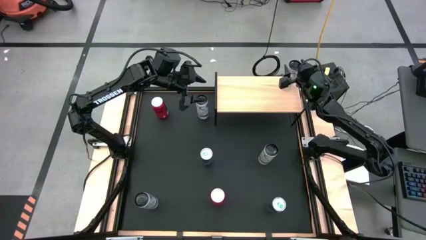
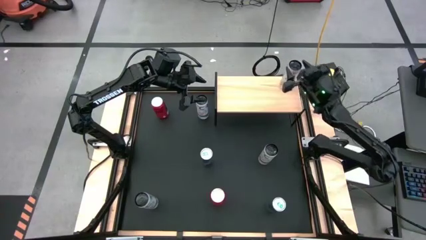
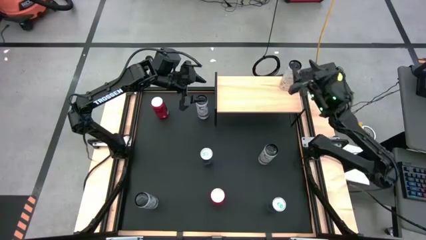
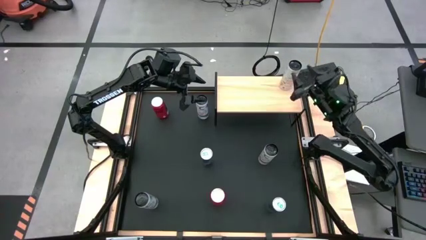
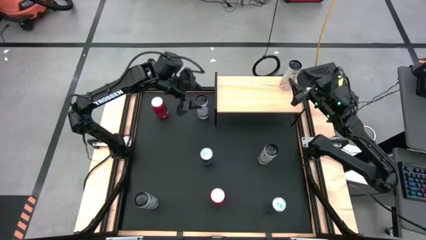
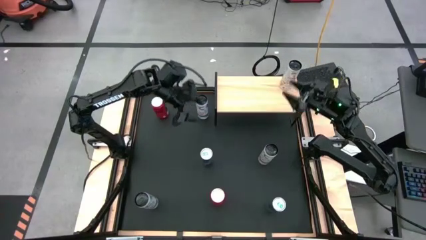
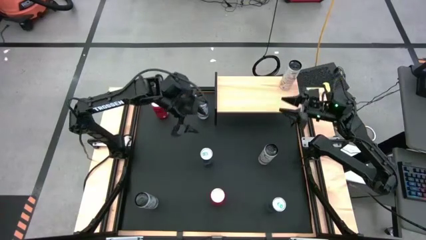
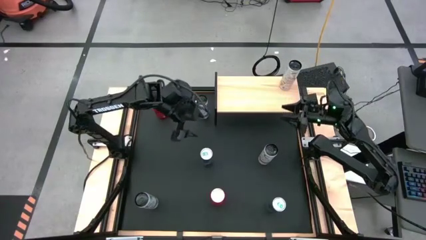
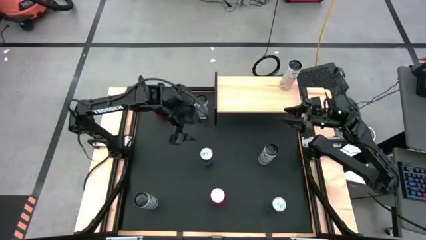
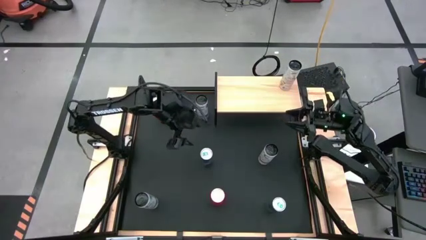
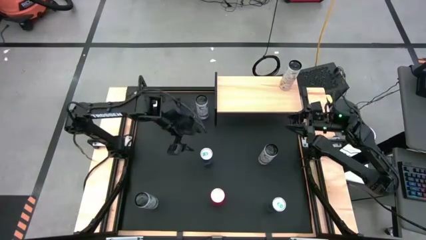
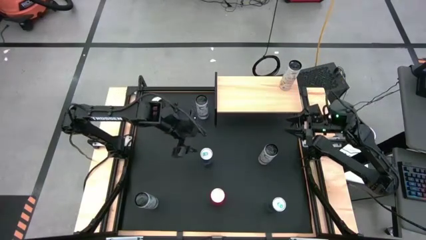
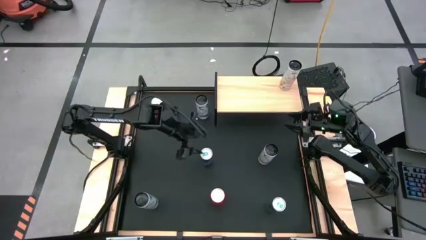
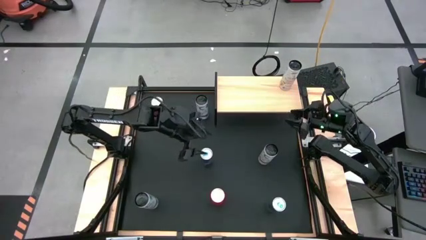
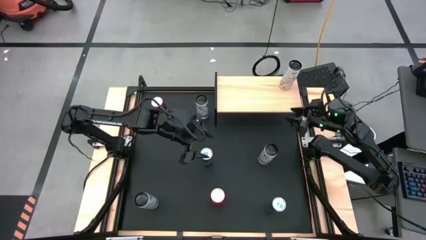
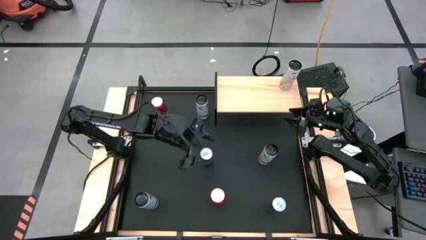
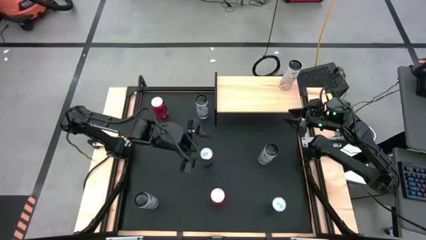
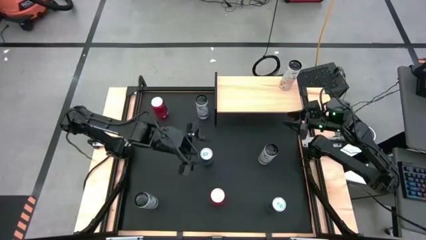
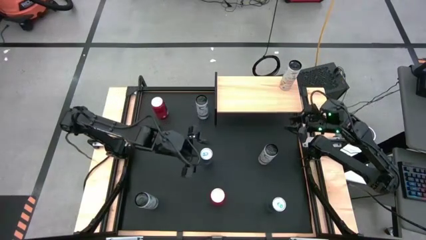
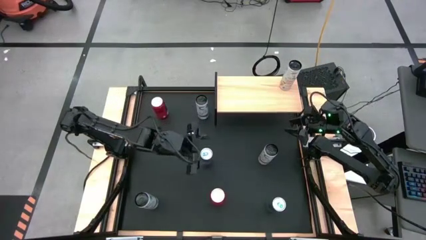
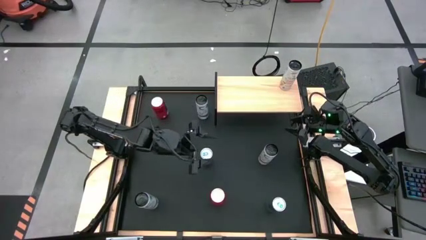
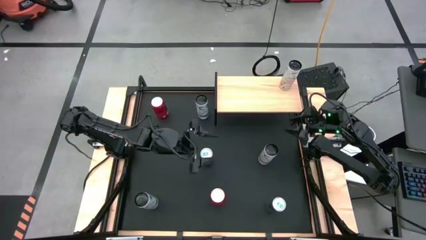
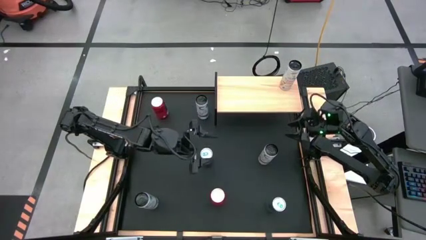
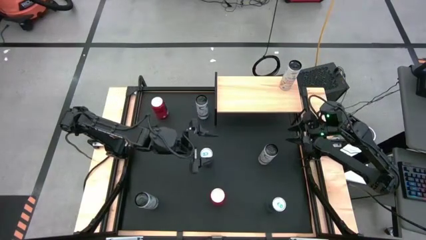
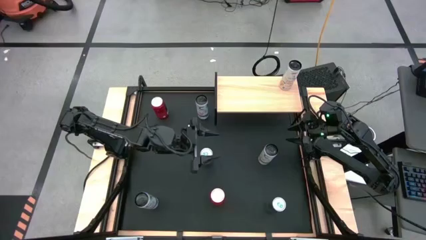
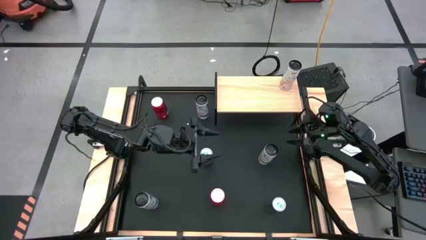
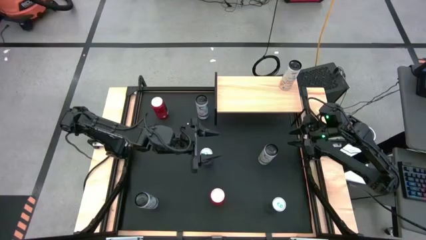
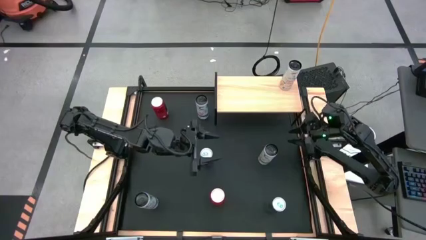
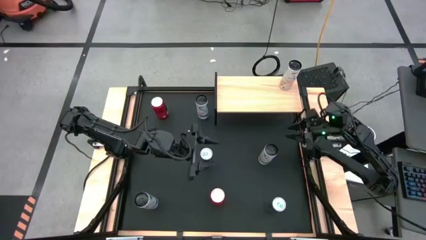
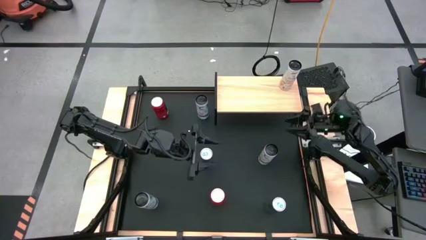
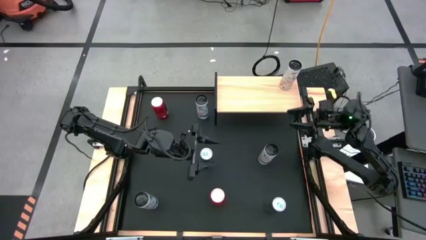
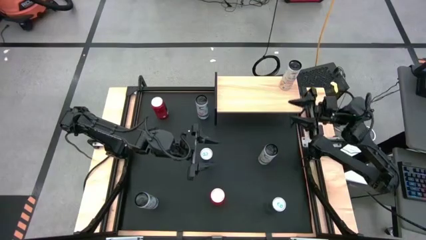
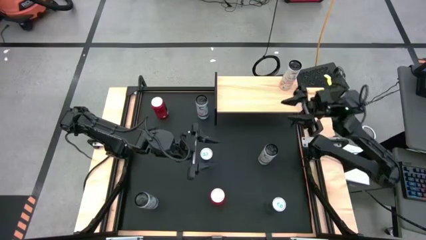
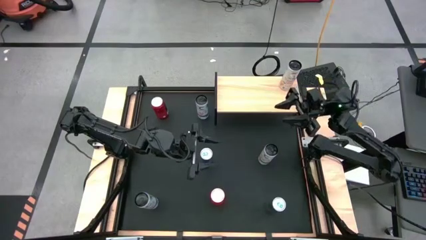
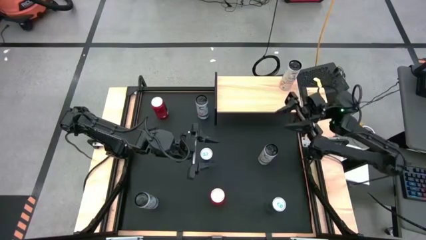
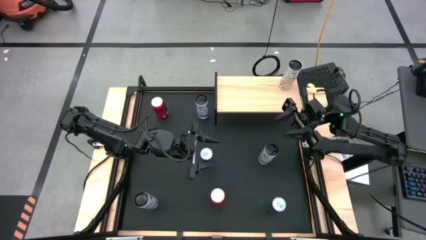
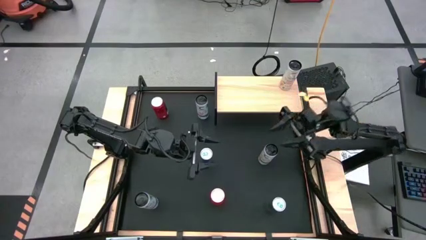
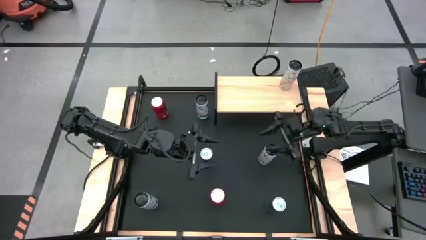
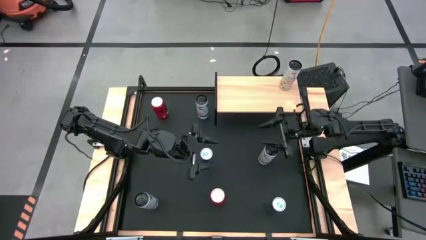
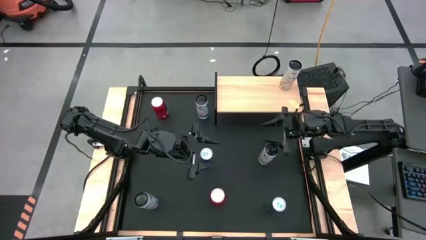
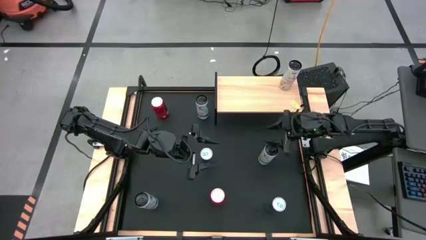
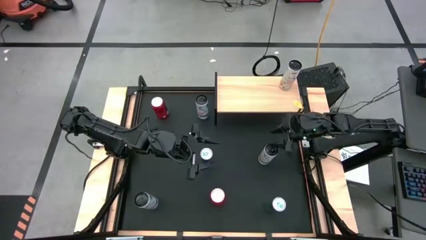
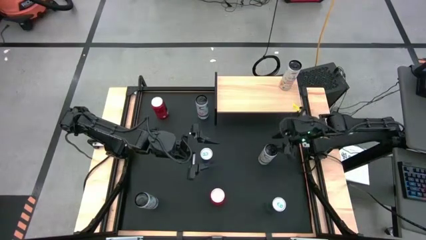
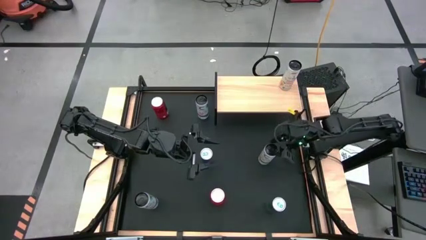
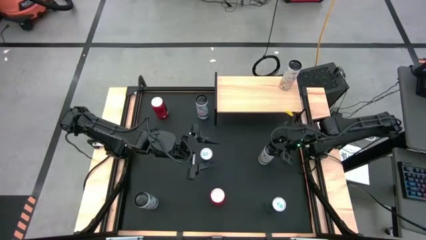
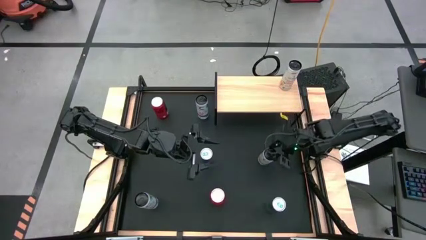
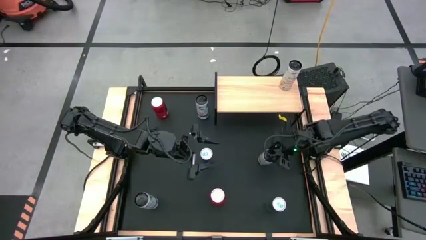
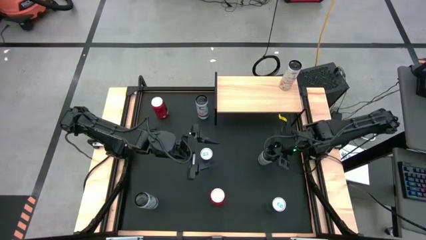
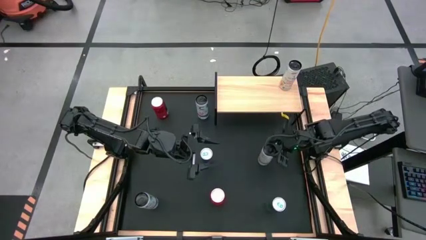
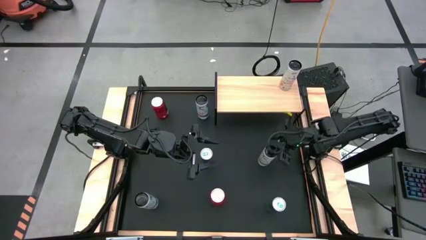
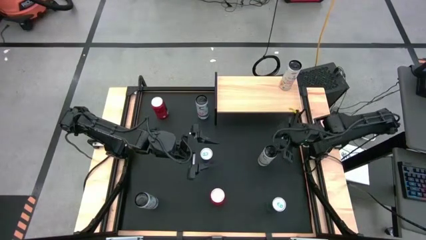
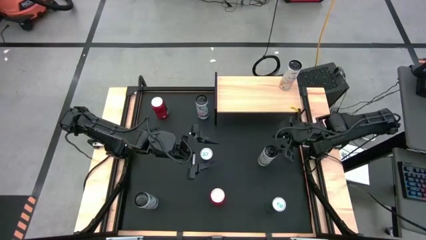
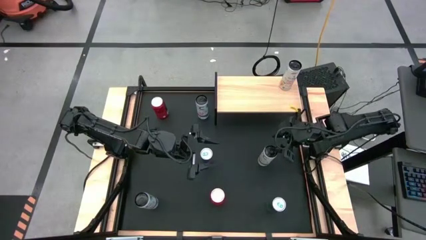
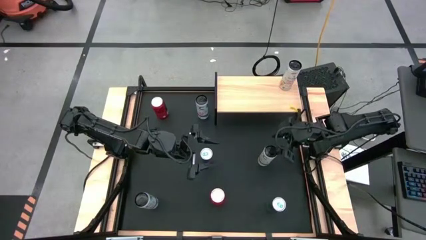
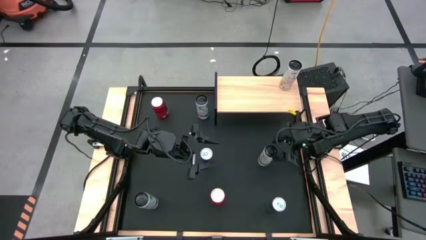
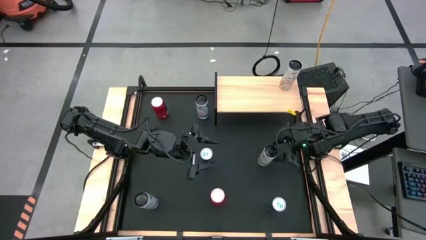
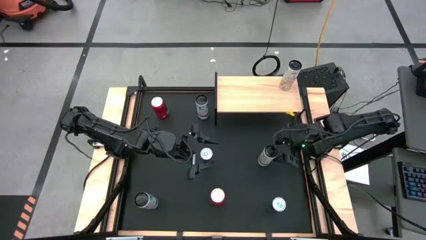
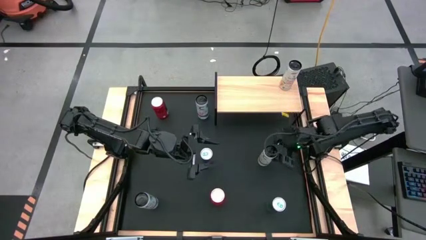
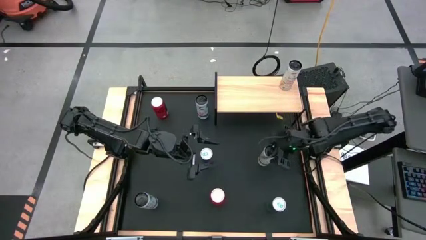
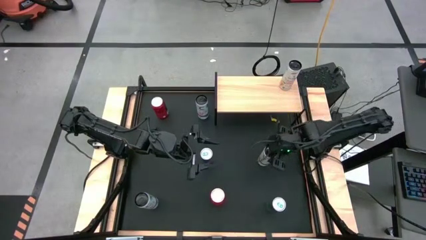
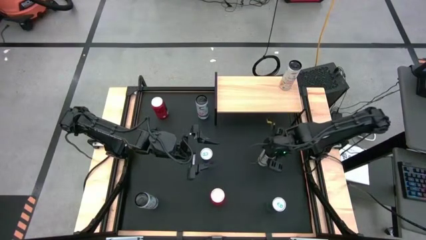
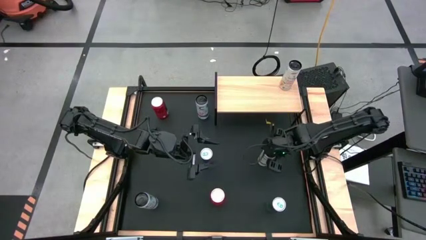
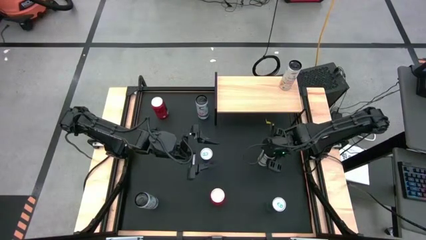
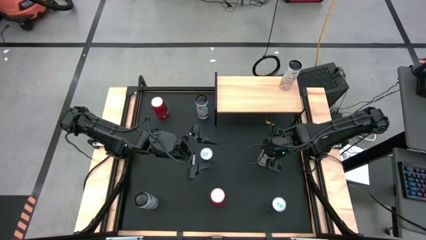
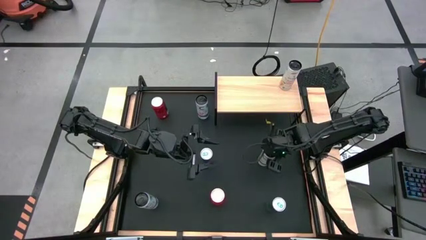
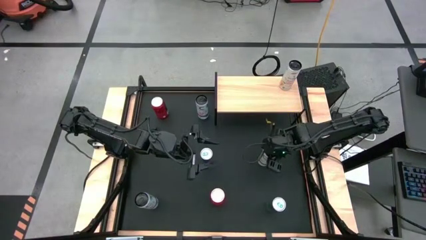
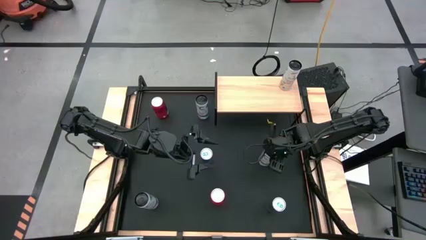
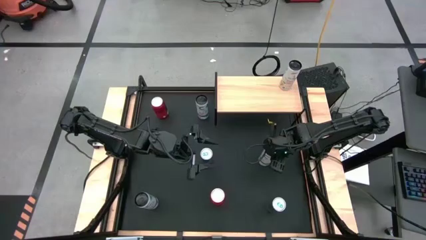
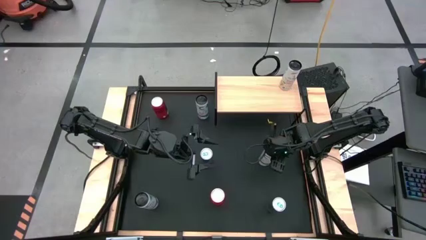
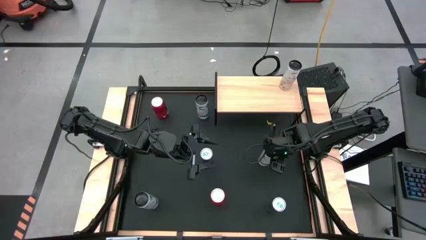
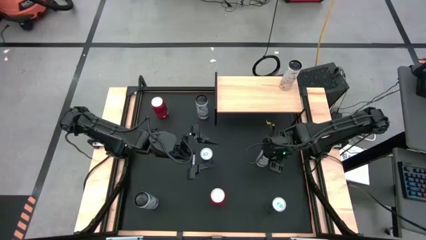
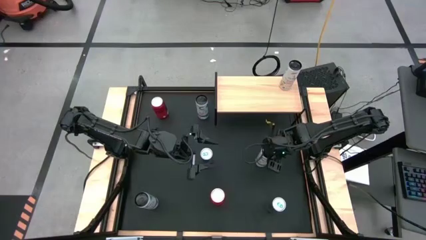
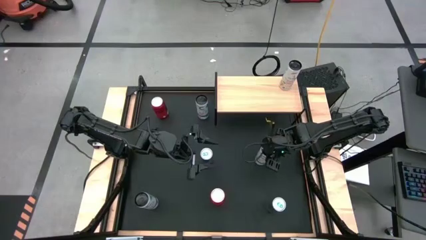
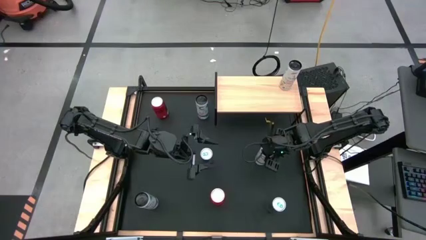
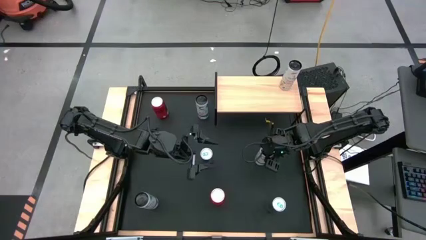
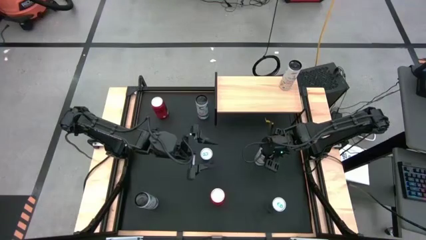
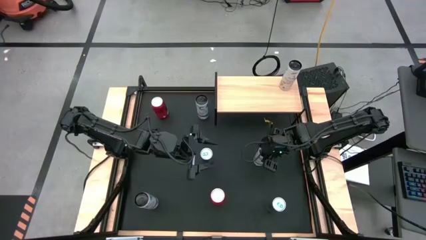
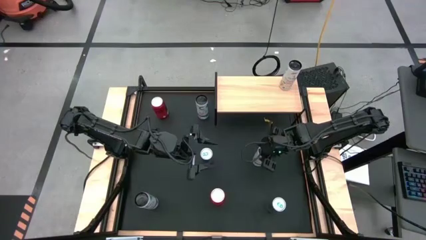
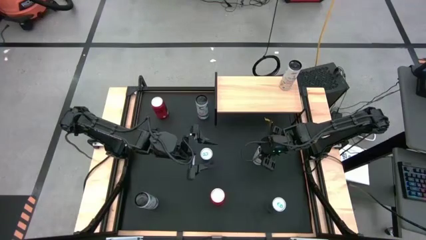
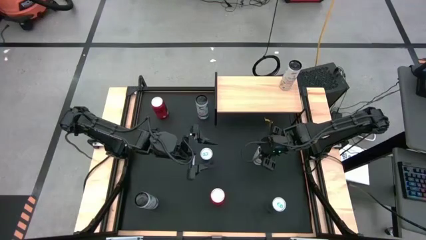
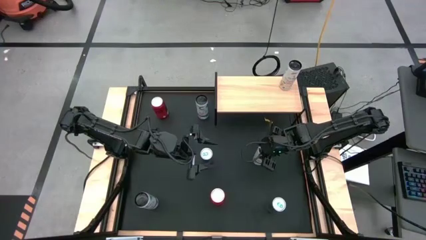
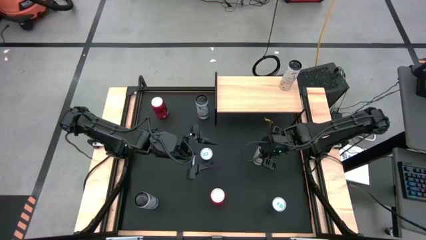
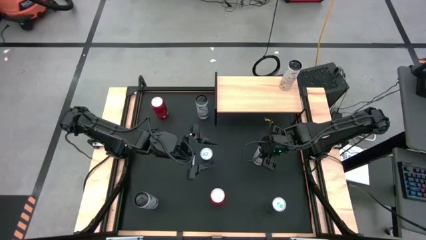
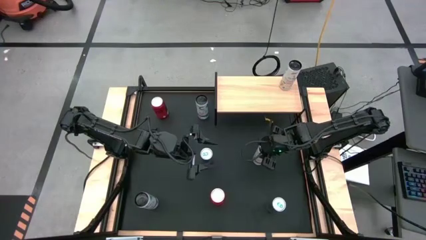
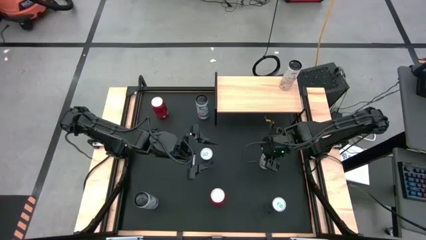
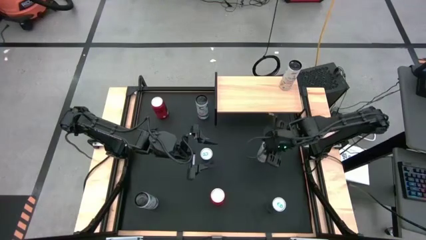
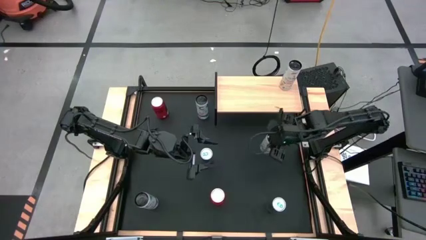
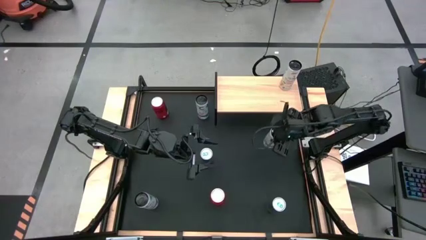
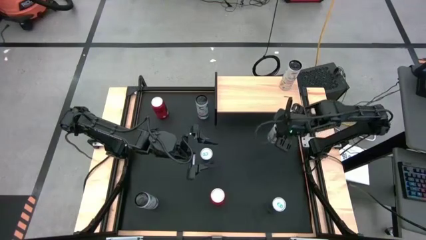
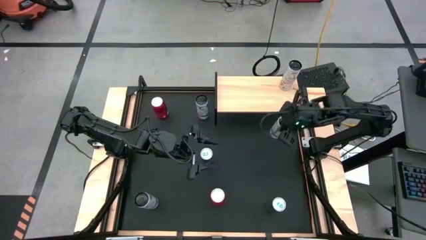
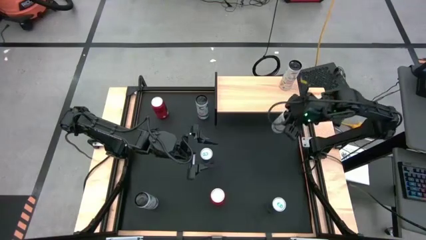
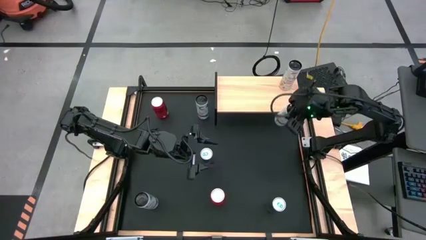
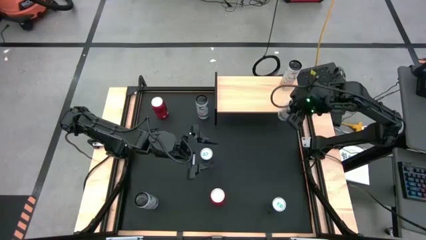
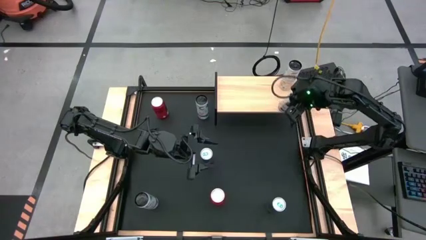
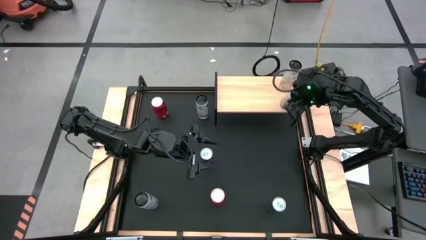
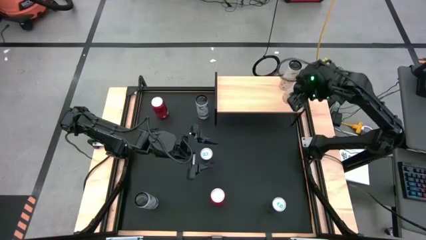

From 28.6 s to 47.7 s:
Task: Place canned beverage on shelf
Put the white-yellow soda can on the shelf aligned with the other white-yellow soda can
